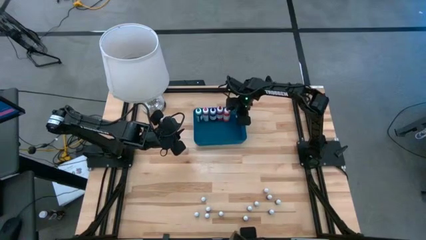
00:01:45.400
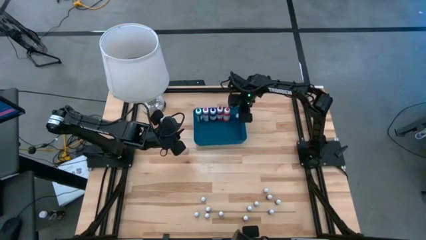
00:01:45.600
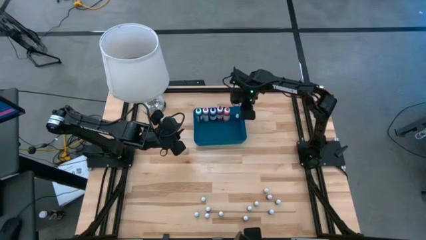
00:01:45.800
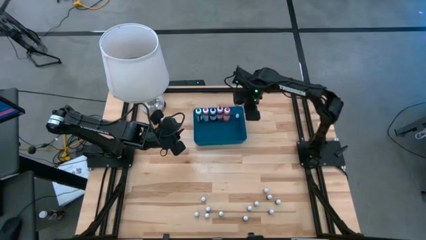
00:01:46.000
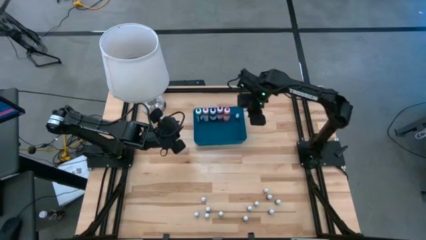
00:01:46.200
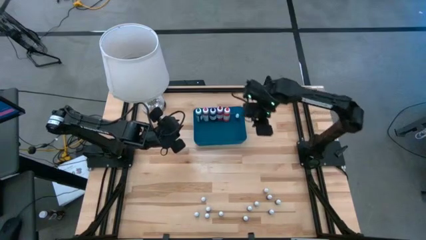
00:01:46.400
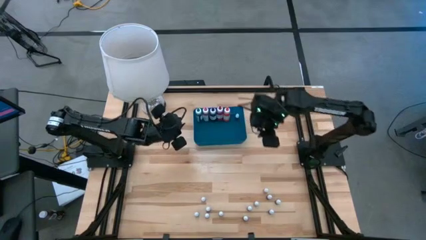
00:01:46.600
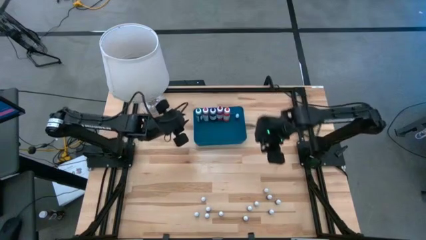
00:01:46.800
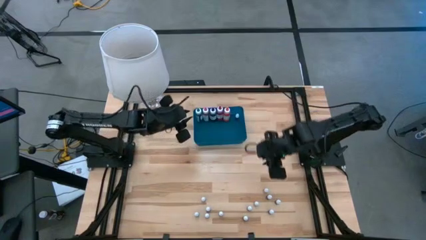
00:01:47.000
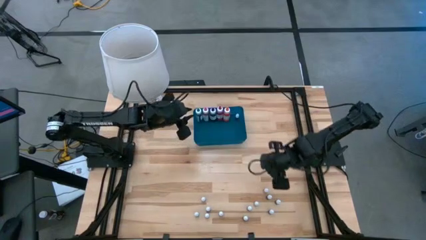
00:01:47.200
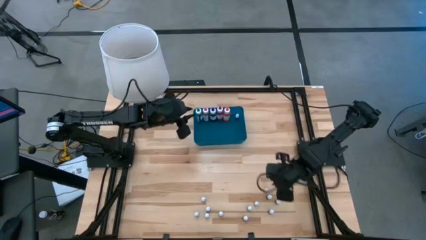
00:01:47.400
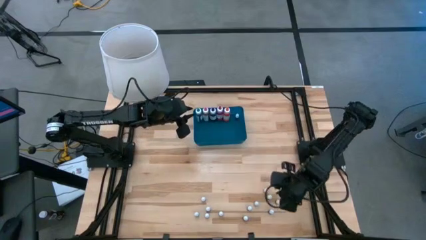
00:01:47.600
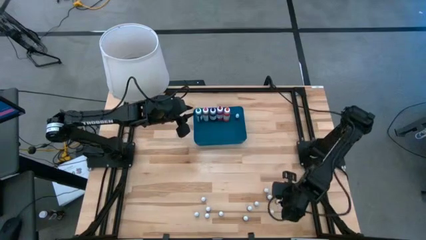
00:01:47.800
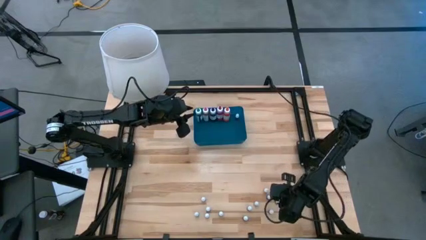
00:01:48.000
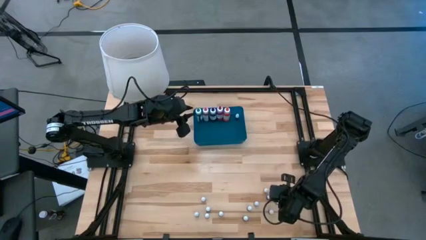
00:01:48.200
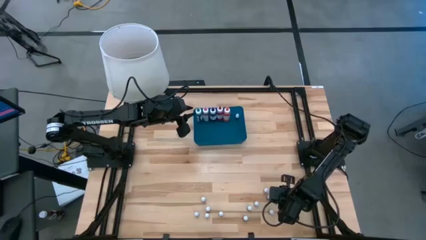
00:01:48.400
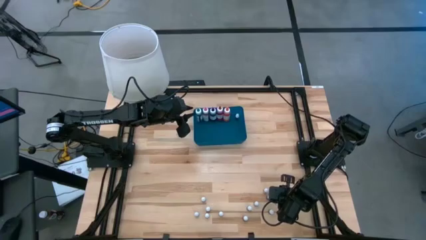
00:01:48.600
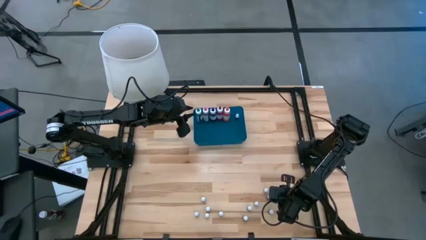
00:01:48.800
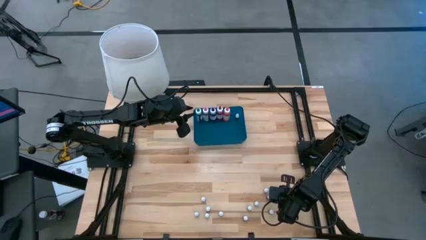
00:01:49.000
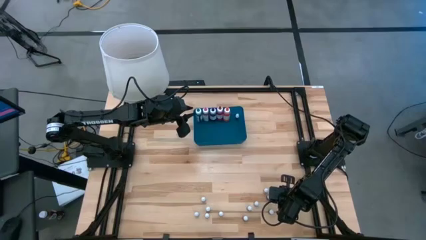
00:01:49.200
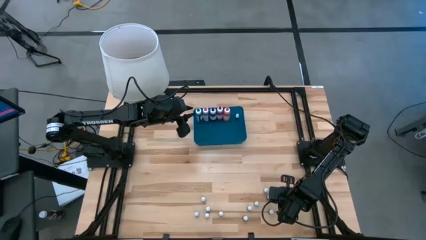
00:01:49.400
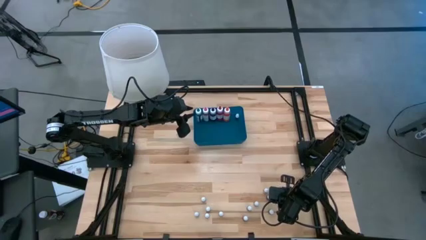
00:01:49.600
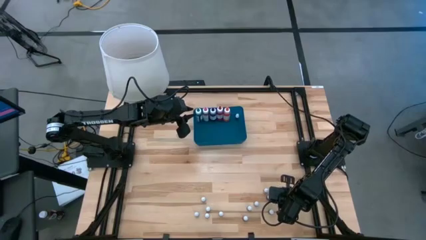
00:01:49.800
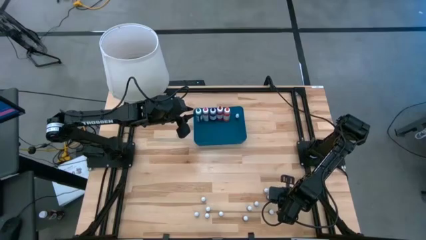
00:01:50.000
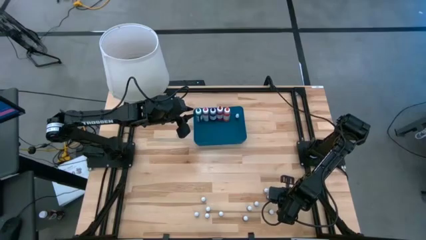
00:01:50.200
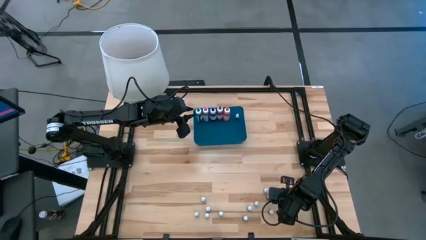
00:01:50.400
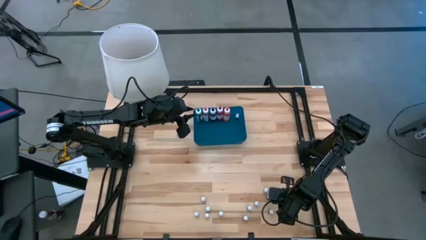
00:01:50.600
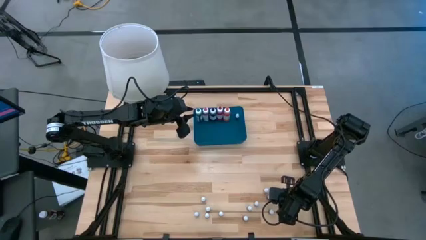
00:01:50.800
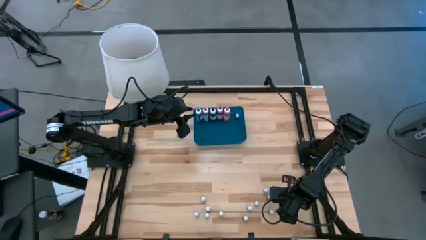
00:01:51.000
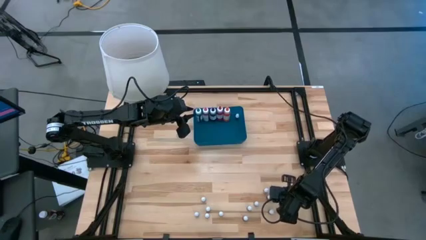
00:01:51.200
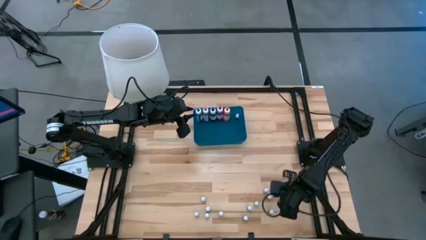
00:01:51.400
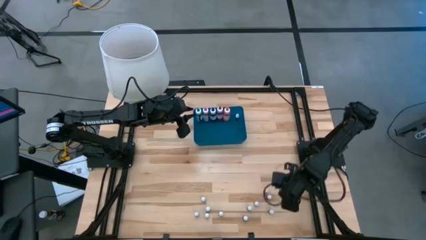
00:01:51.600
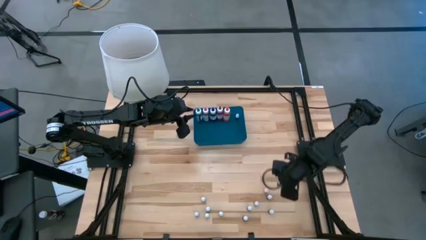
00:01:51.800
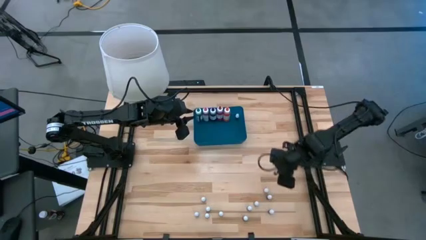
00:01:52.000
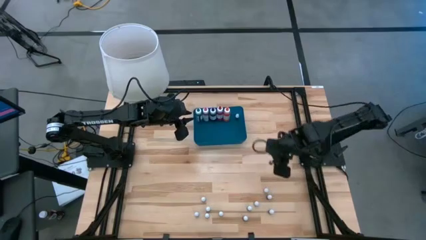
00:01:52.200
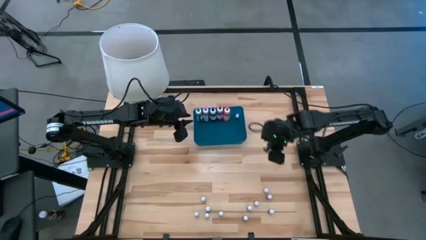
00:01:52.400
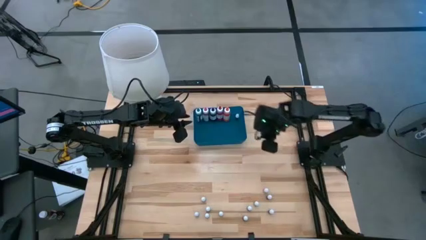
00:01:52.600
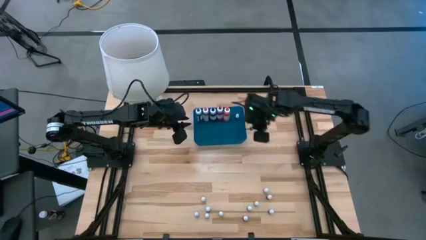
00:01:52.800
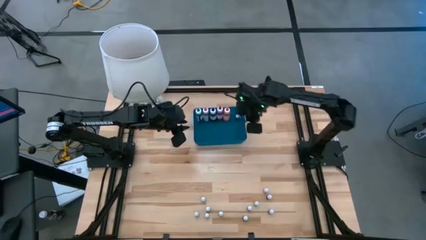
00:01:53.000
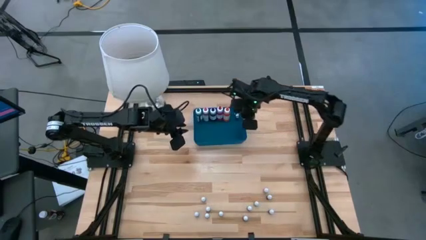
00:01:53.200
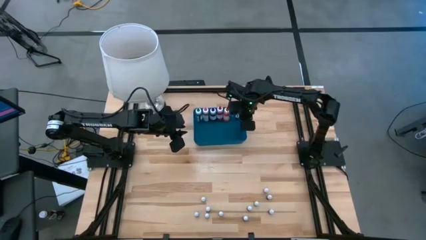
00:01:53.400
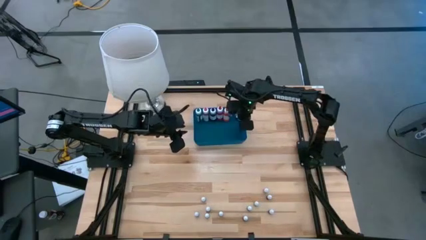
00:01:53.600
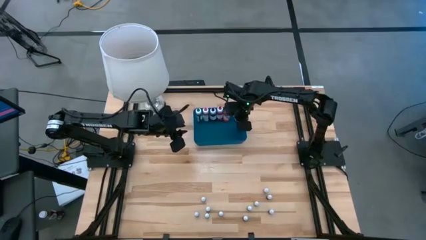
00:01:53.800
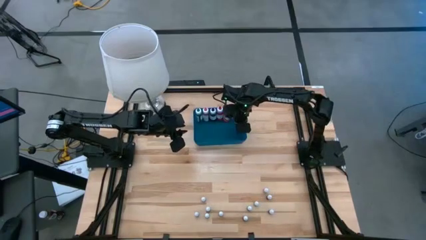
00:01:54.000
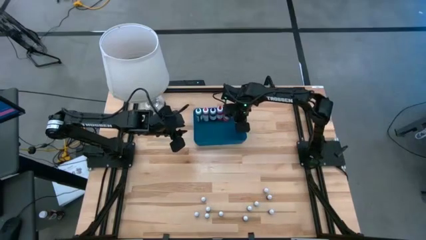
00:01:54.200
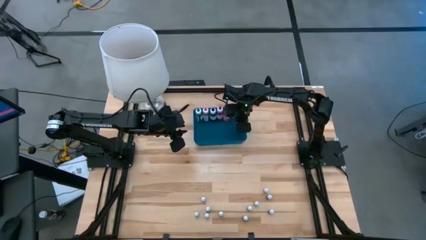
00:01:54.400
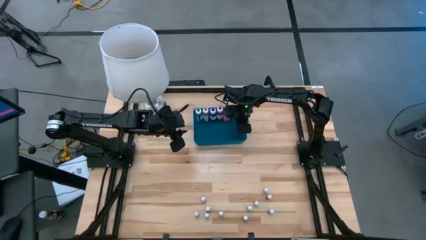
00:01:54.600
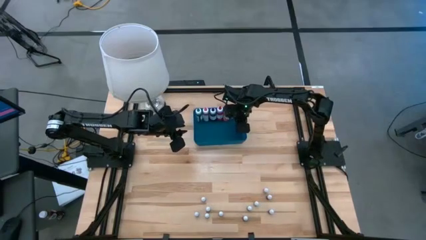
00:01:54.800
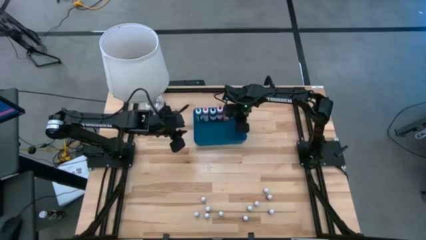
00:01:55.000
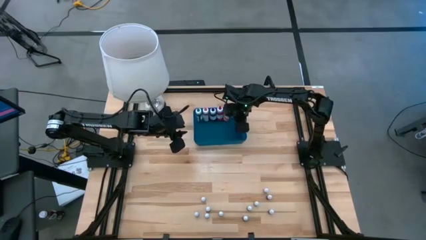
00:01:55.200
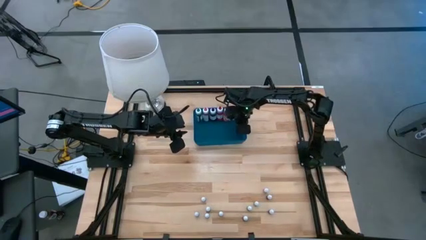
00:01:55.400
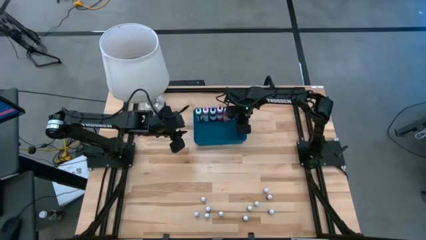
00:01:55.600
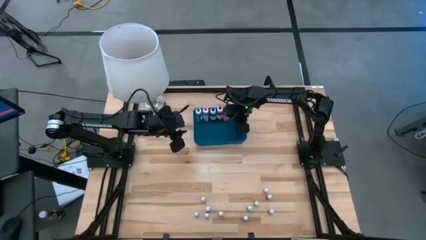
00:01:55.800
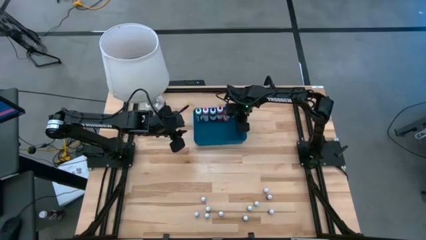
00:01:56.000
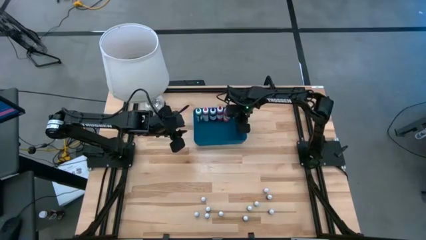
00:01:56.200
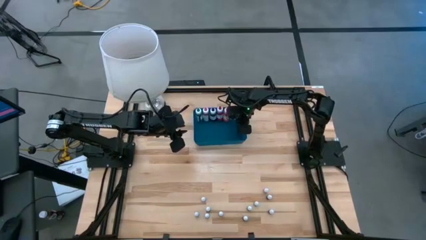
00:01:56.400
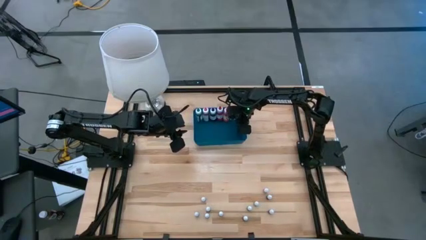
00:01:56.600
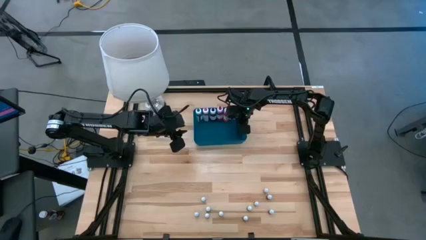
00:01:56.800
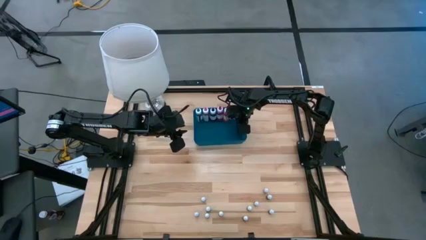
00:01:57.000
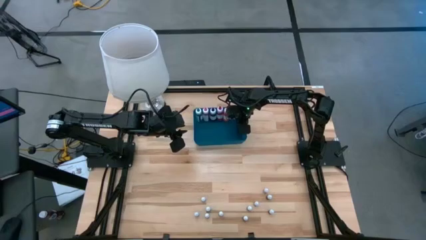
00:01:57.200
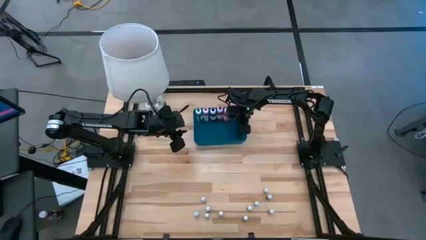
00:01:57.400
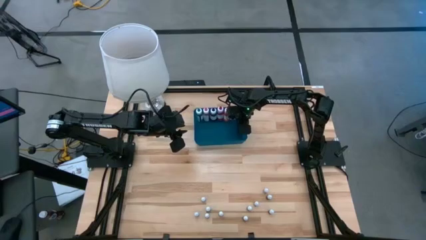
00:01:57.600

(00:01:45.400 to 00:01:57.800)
Task: Pick & Place food coloring
Put the small black food coloring bottle into the bin

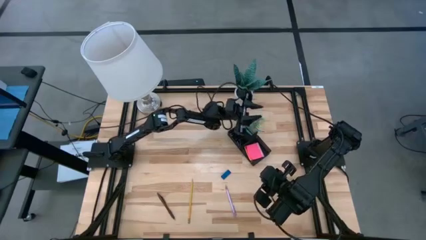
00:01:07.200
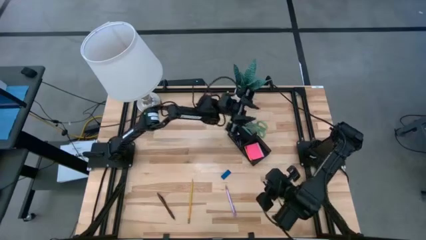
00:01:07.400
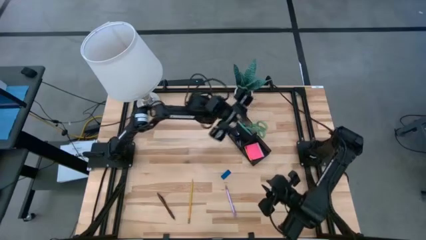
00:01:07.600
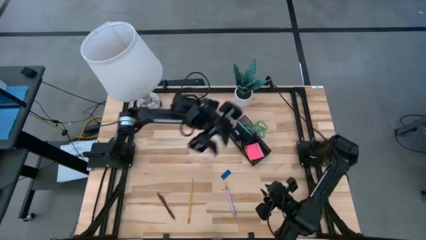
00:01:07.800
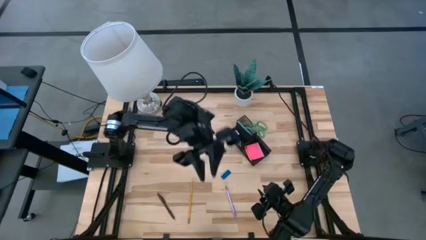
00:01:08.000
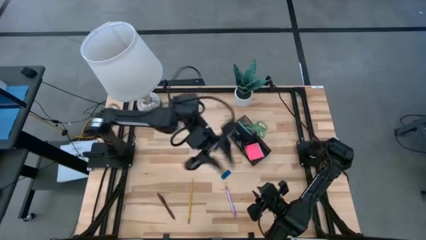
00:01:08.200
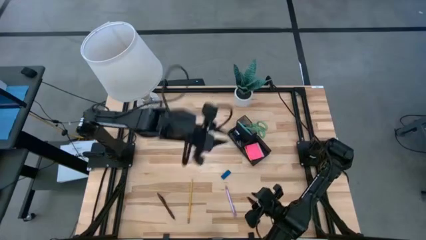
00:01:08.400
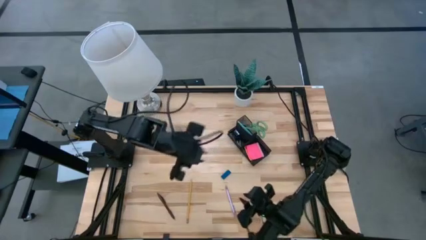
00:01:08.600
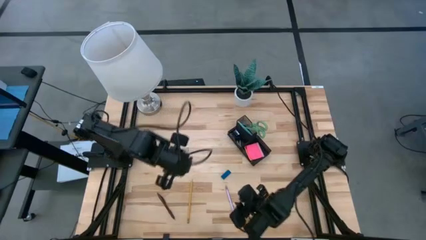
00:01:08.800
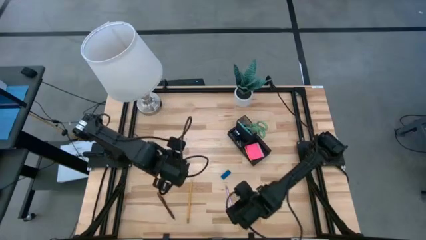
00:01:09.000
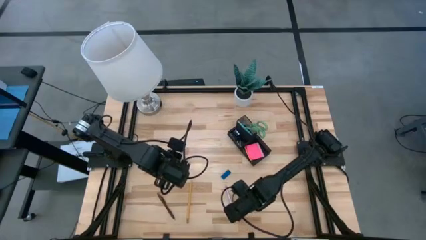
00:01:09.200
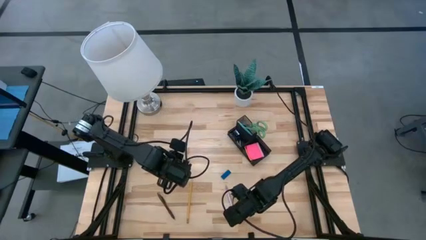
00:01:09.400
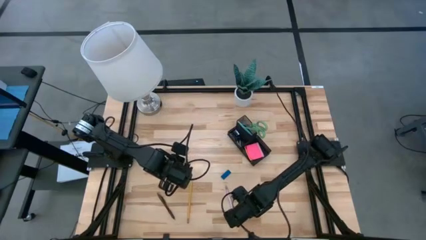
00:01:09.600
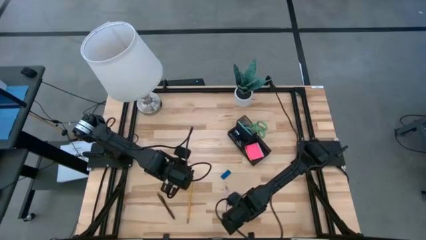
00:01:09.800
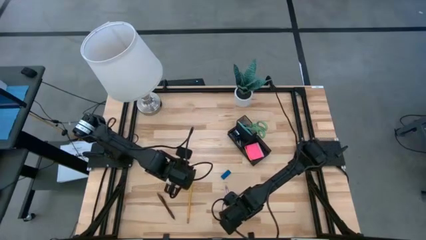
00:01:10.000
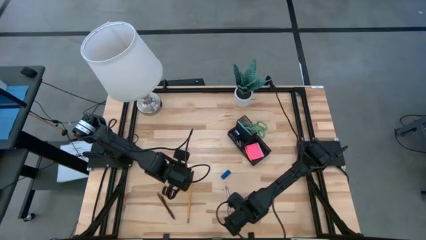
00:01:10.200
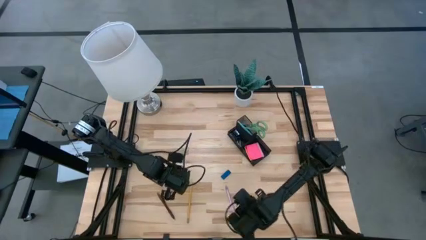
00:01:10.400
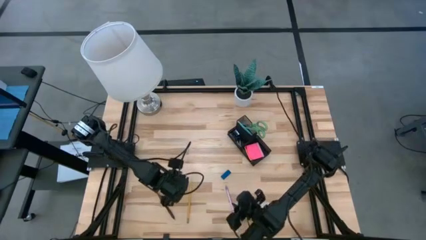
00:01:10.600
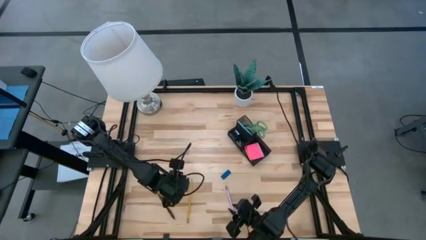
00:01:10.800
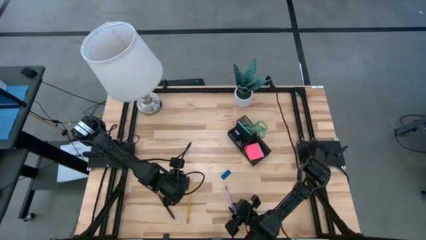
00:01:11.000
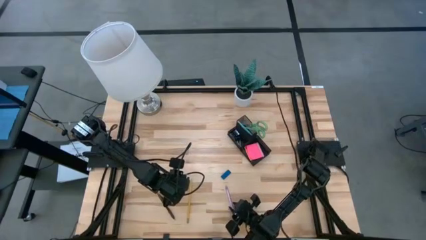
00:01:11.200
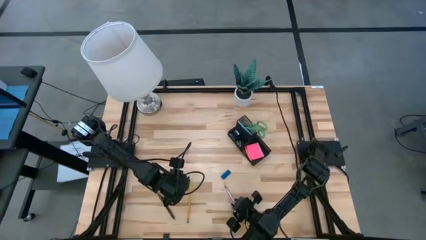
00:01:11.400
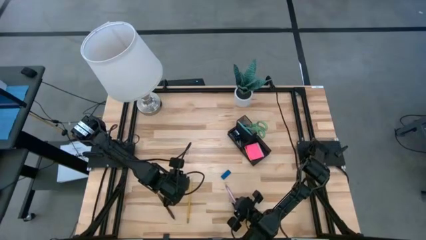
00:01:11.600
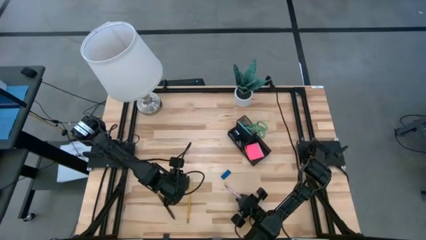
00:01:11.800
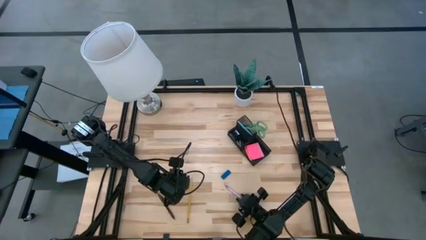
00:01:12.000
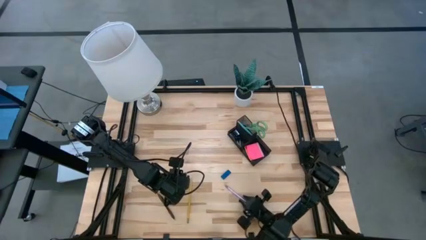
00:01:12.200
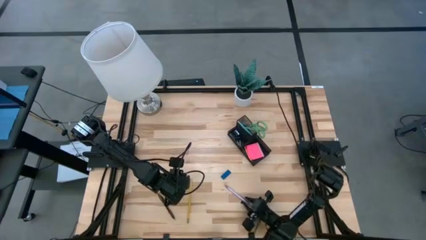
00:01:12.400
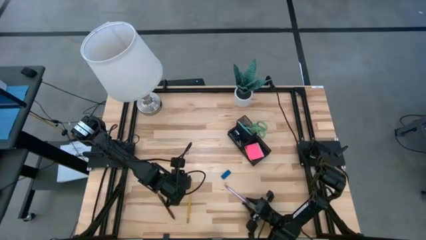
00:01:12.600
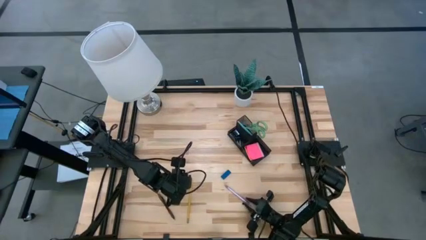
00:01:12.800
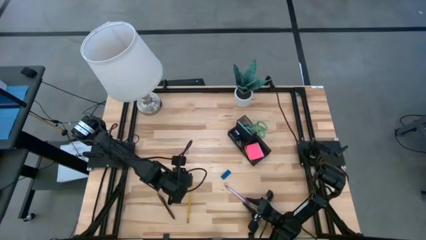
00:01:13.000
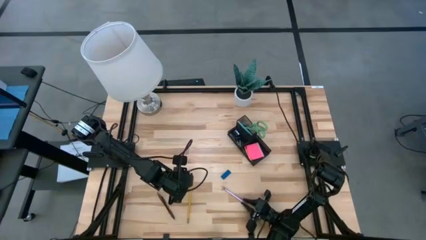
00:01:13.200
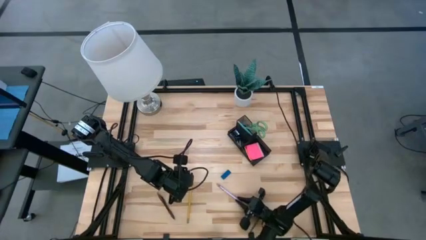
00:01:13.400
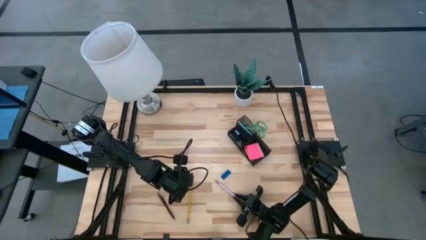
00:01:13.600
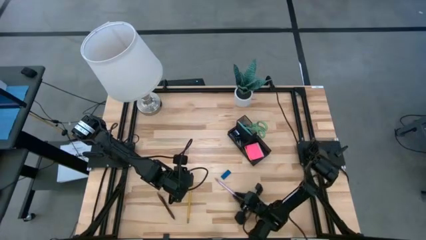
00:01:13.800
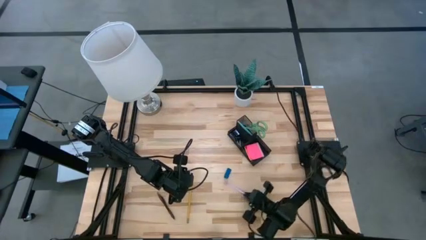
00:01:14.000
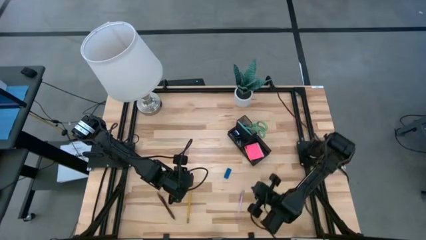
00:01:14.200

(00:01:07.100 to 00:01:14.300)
Task: Pick and place office supplies into organizer
Put the purple pen into the desk organizer
